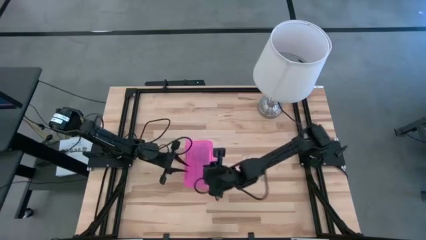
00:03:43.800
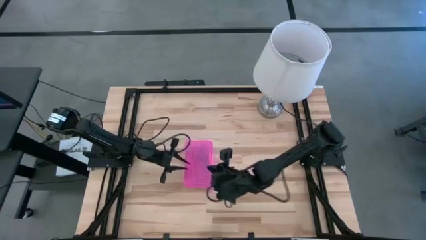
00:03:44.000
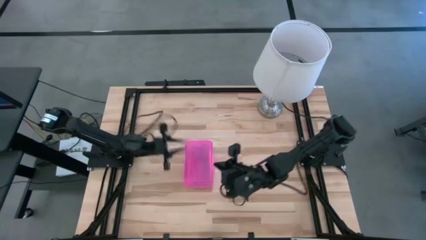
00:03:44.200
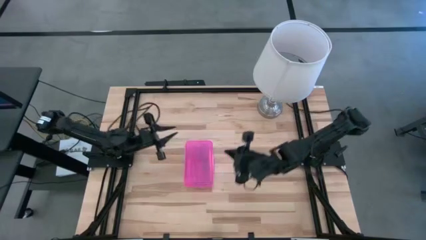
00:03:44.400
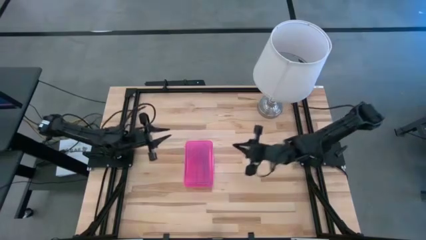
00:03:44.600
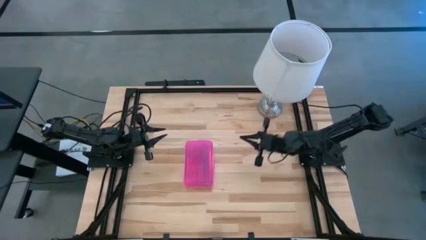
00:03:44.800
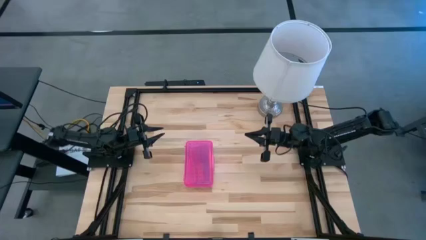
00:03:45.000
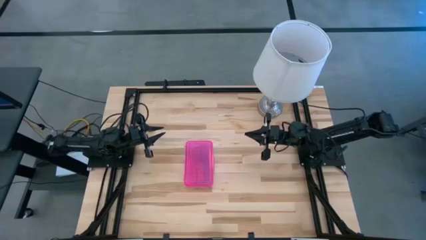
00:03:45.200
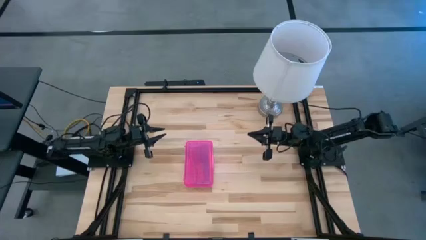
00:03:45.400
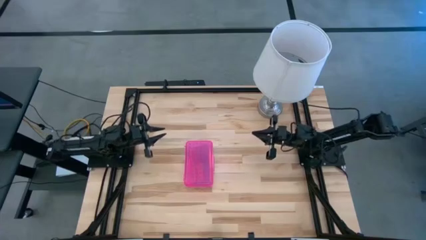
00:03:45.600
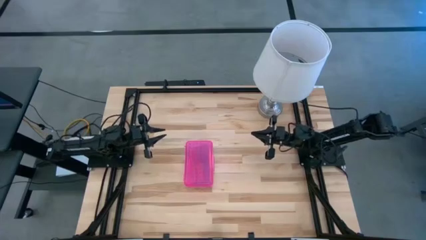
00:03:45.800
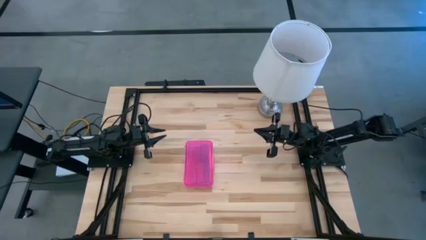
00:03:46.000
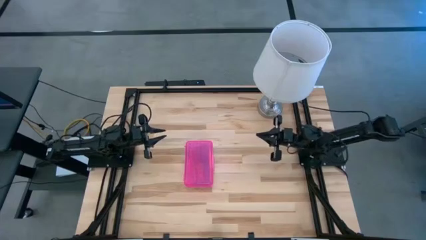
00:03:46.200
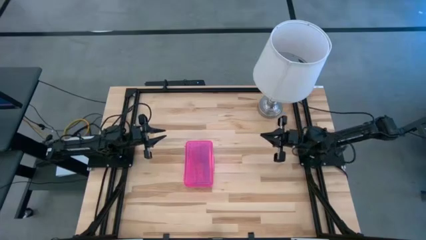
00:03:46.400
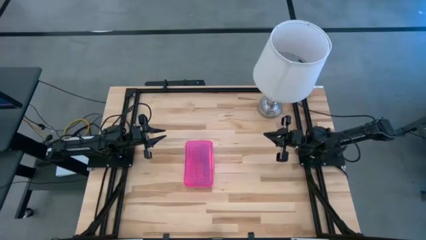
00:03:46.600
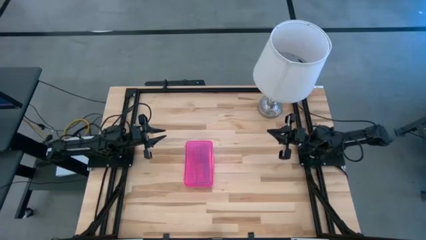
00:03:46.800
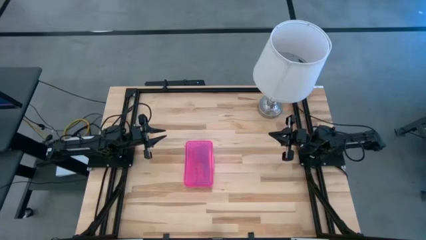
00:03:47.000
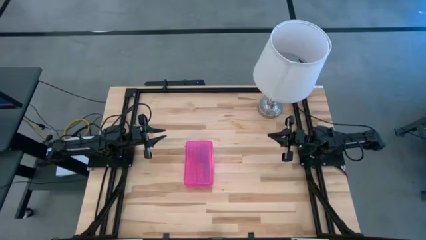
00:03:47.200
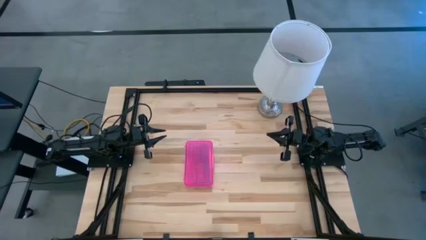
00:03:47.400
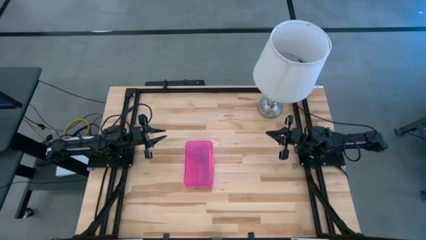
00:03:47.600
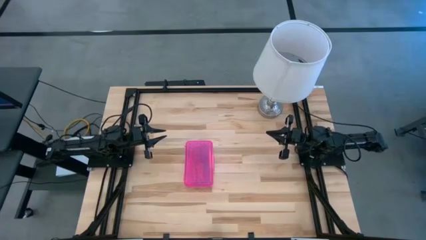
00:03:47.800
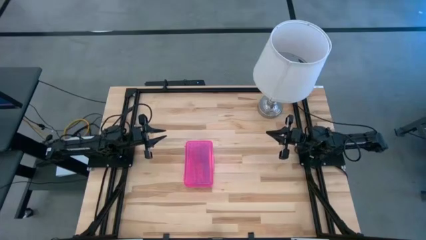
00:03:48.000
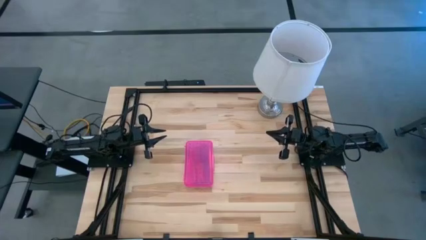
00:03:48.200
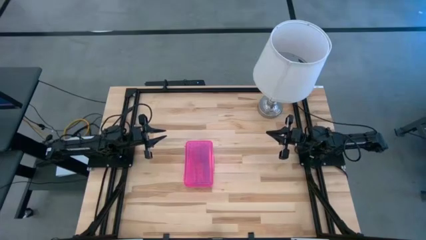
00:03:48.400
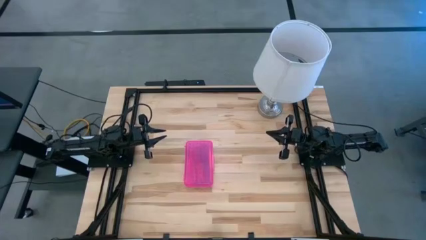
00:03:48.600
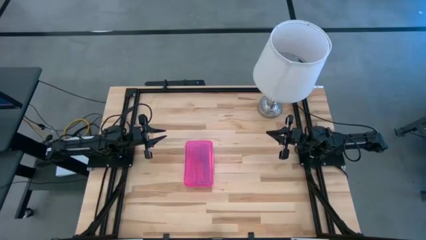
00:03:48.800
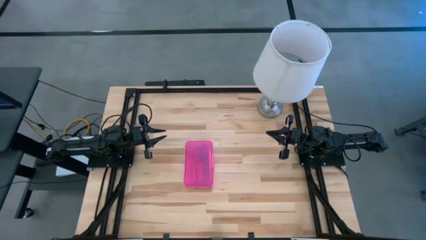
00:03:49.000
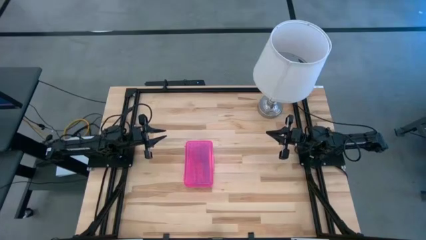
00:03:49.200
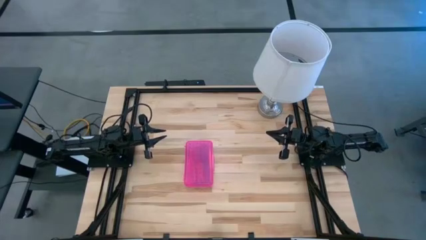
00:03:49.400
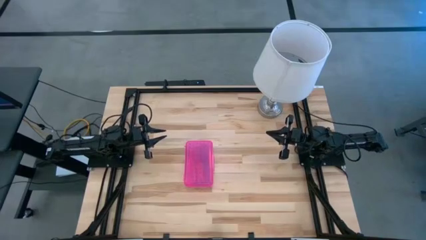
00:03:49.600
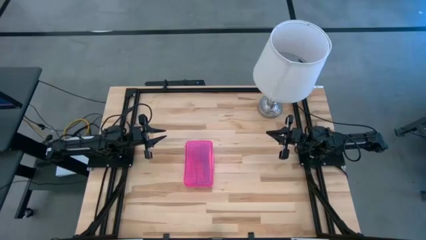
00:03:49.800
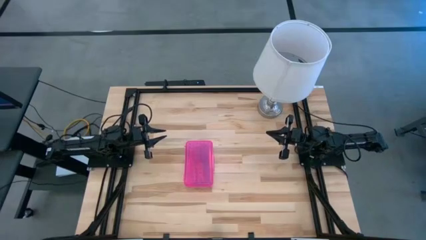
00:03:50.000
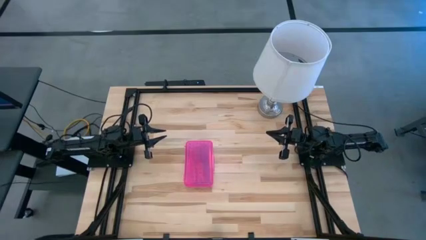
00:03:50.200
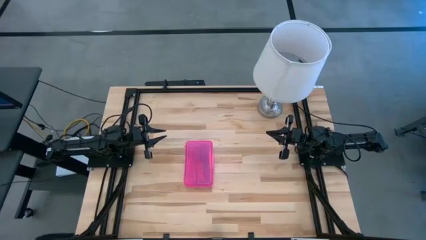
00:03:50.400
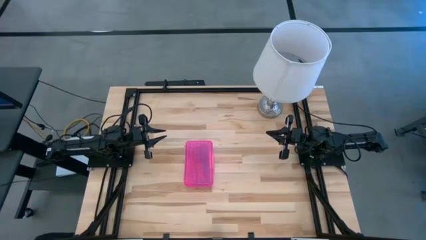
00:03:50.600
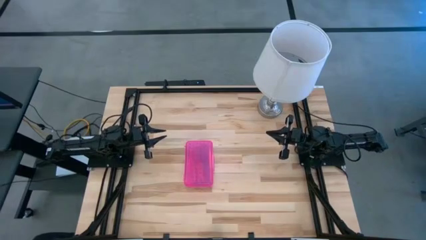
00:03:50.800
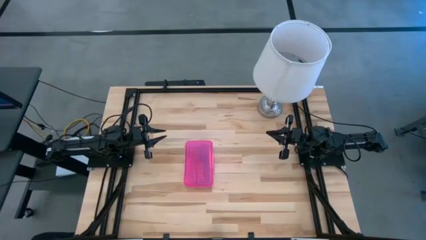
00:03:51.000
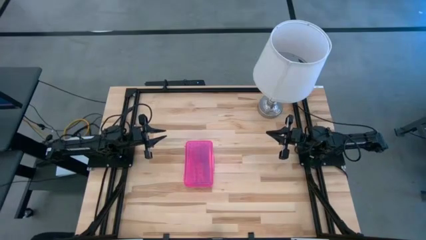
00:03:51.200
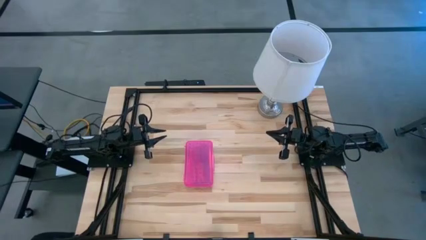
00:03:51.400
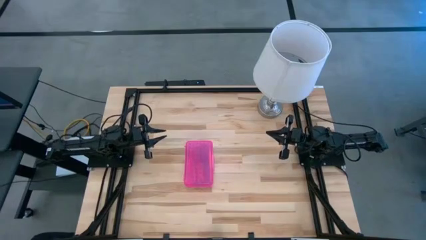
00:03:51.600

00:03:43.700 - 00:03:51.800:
Task: Pick & place school supplies into a supply box
Return to Home Position

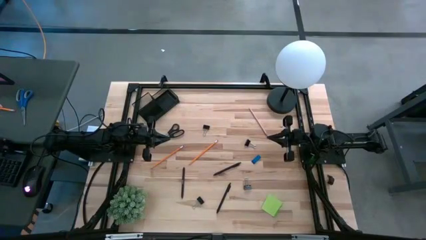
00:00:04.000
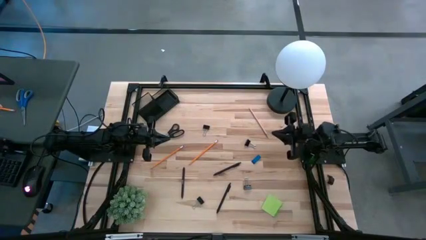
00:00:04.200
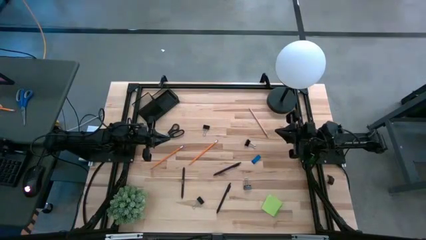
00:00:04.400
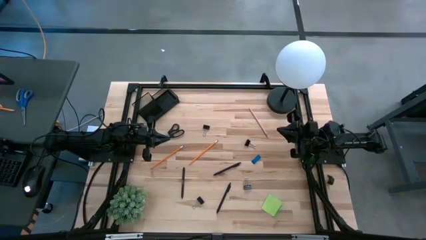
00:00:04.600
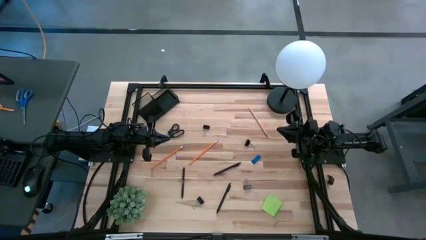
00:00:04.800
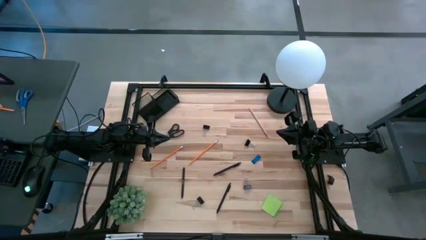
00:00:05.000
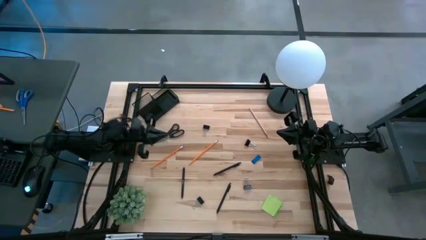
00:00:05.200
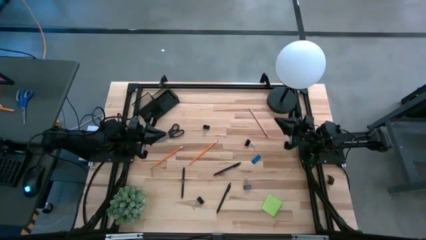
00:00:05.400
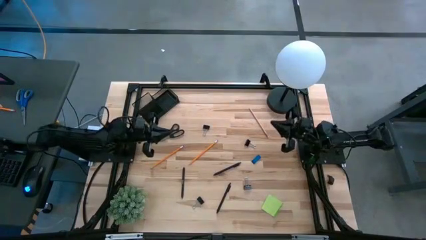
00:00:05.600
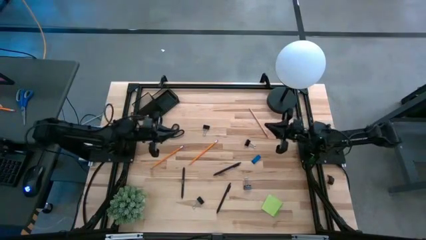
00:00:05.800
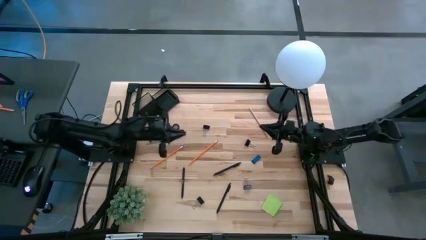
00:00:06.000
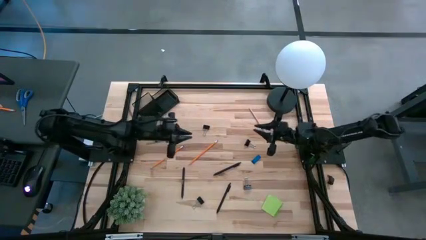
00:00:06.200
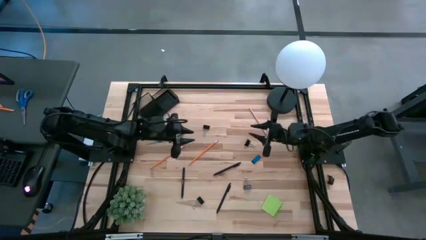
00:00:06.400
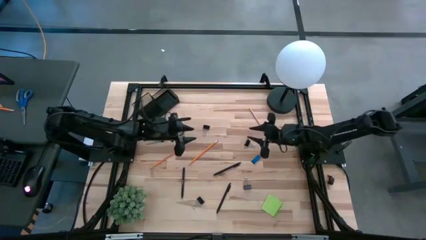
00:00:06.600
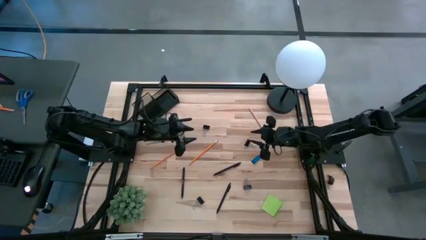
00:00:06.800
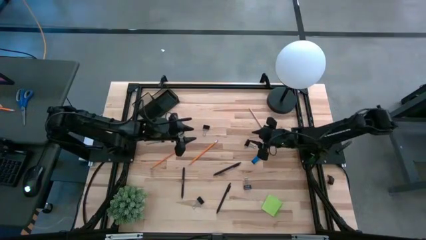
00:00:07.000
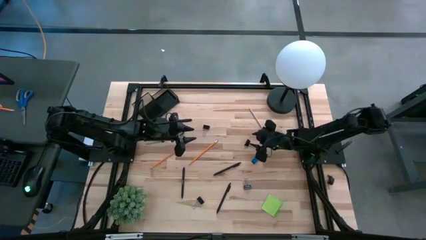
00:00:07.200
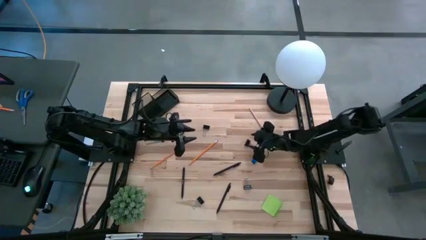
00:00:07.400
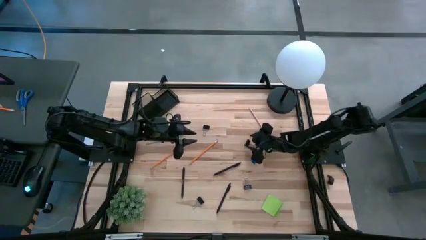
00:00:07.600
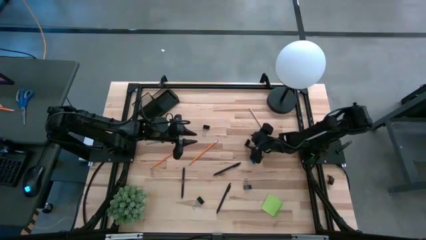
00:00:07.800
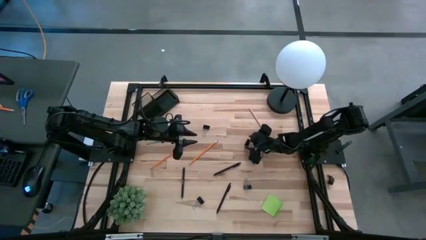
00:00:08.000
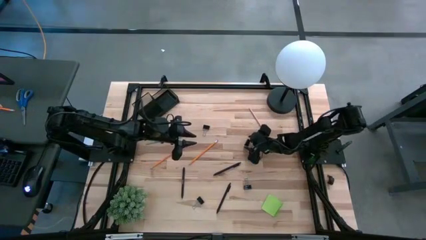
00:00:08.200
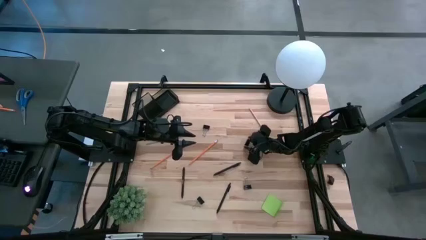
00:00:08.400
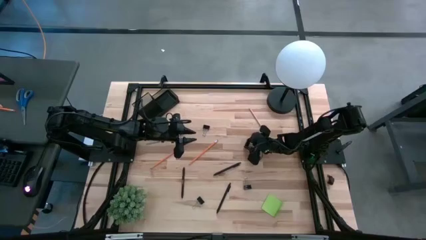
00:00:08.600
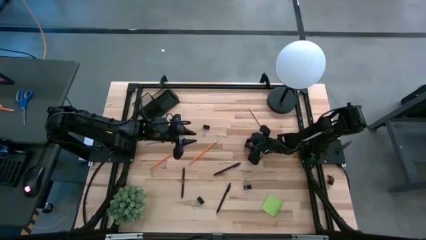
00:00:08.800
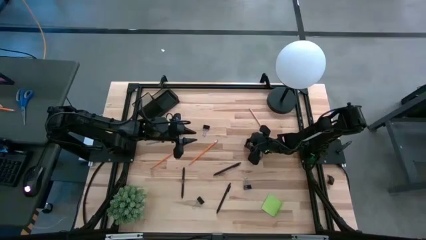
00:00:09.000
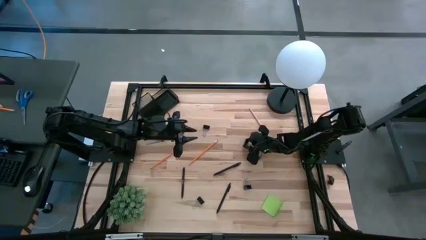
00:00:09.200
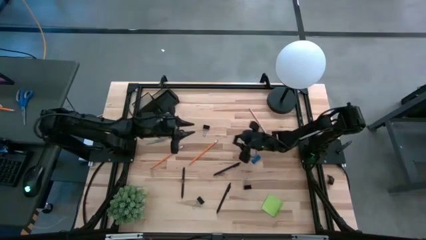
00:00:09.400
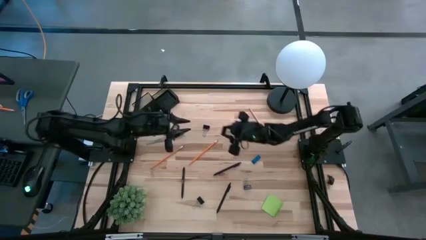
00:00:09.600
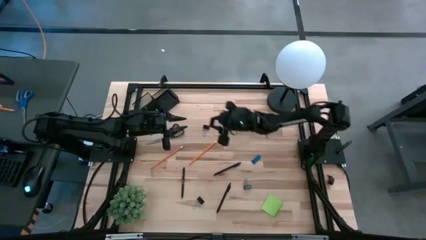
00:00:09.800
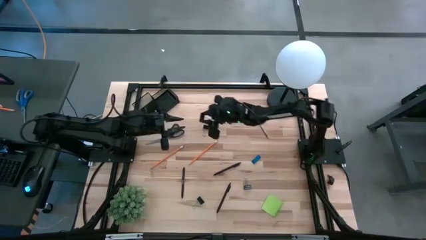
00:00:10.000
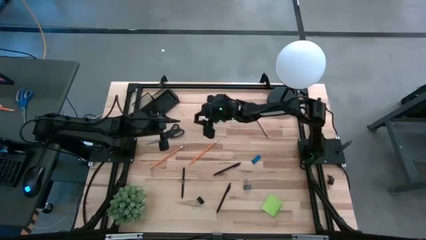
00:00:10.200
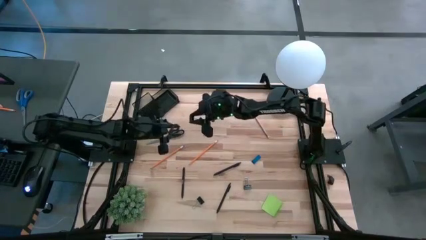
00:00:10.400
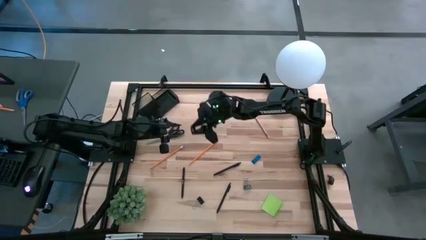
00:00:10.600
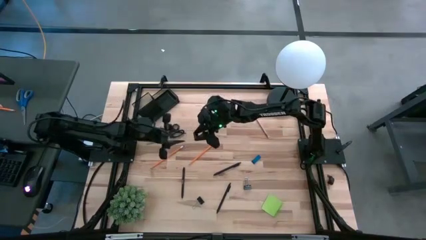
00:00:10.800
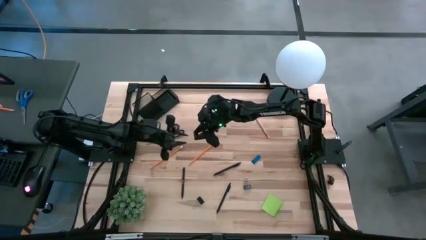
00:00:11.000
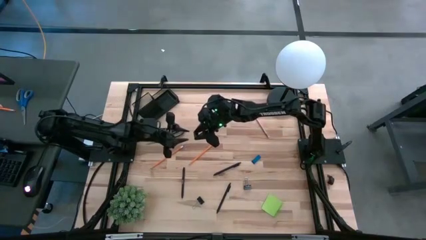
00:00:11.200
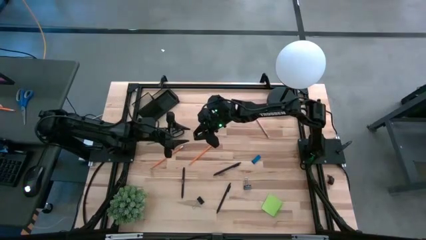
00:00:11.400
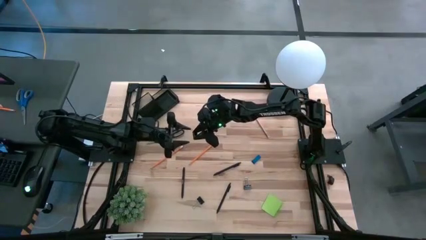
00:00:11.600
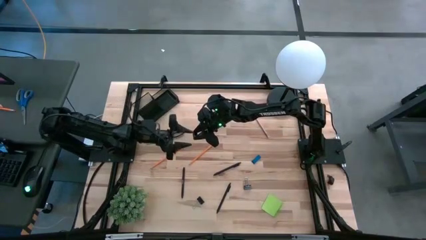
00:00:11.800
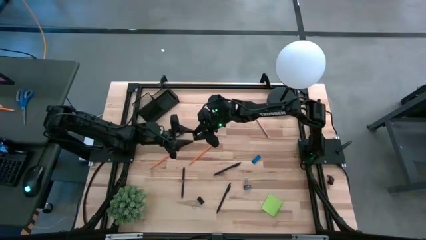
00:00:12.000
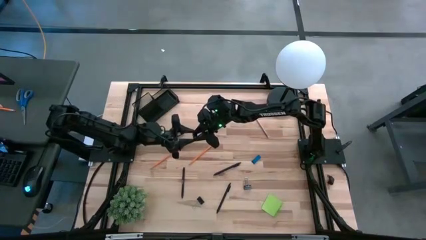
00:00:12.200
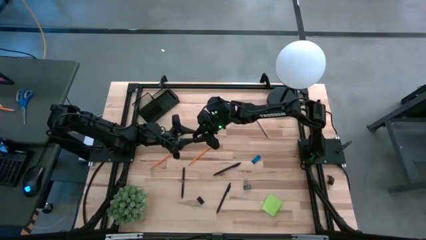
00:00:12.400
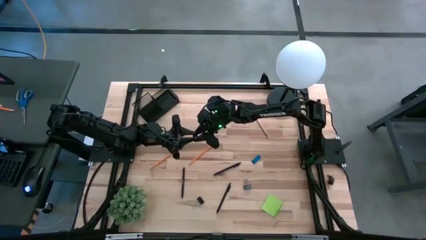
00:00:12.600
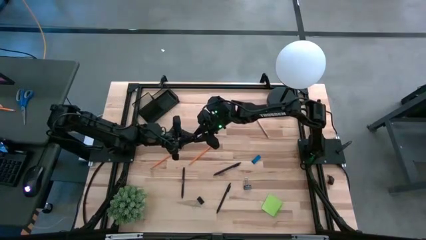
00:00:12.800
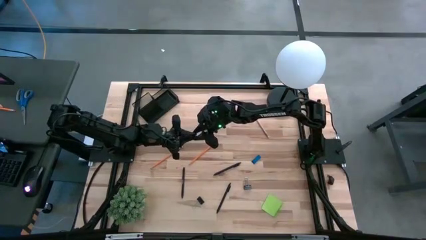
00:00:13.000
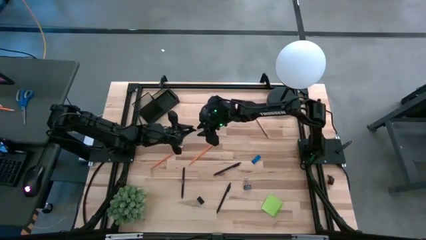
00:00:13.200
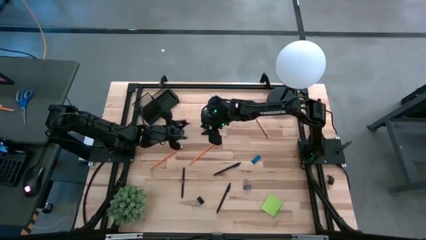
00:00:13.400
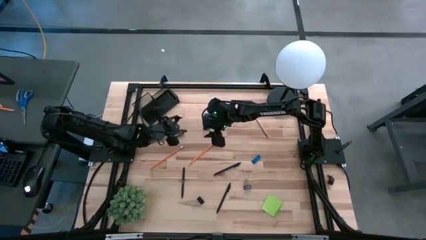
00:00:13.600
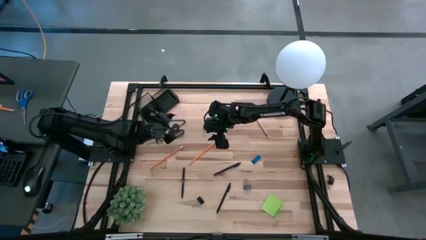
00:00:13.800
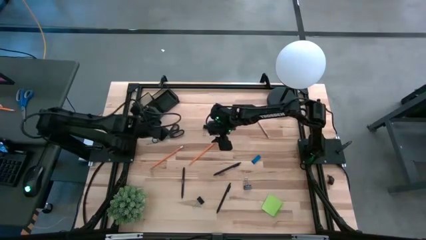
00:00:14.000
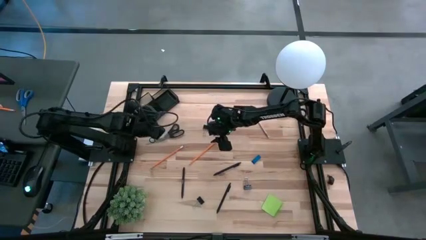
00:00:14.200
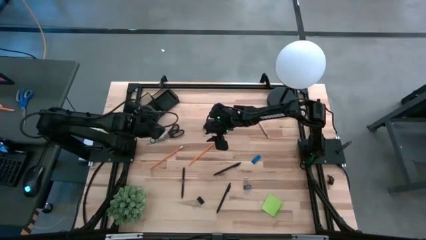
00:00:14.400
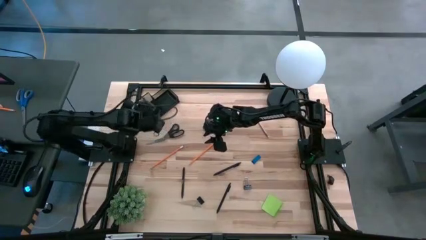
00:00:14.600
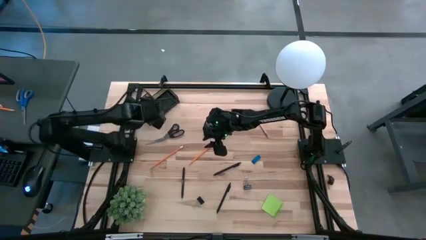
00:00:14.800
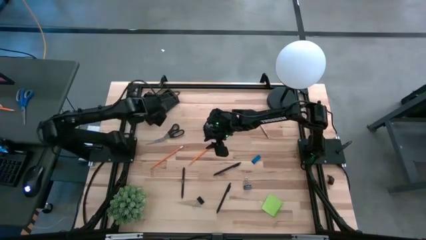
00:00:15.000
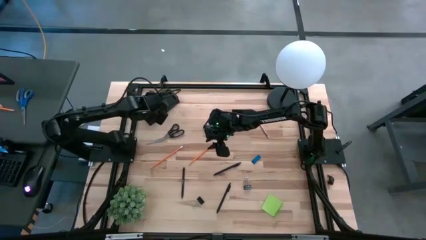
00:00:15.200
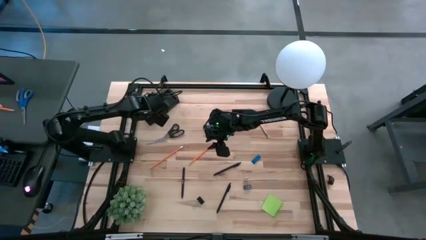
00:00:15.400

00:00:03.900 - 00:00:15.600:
Task: Pick and place office supplies into organizer
Put the black binder clip into the black desk organizer
